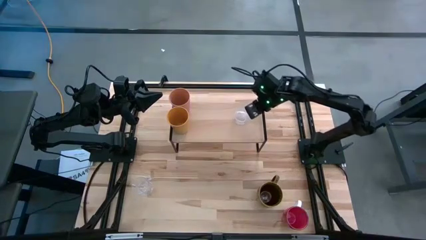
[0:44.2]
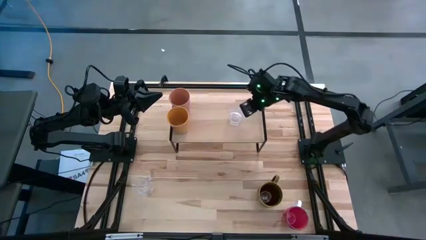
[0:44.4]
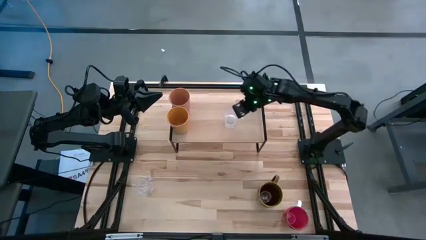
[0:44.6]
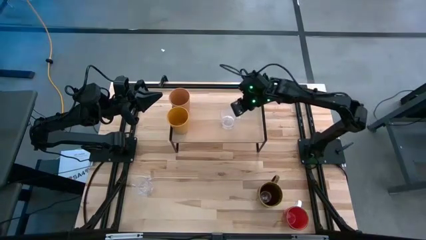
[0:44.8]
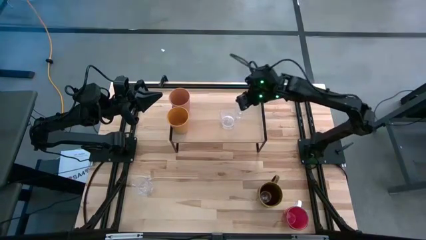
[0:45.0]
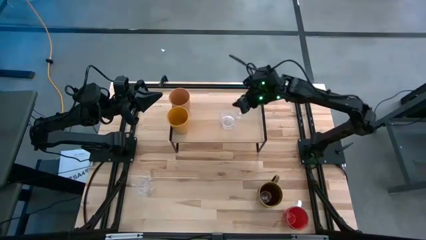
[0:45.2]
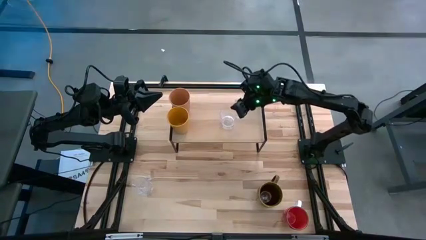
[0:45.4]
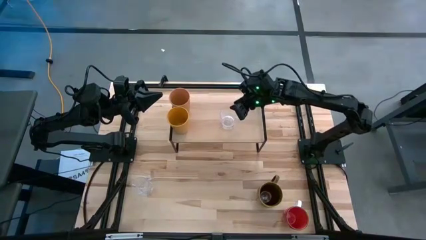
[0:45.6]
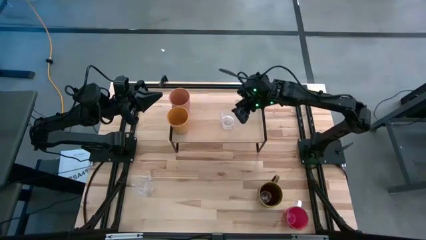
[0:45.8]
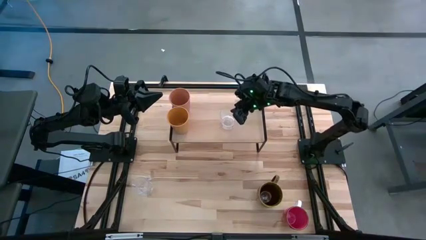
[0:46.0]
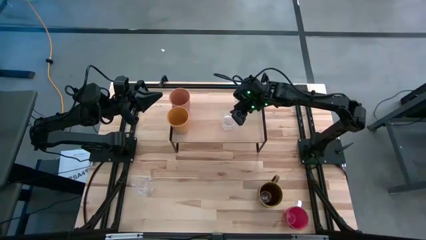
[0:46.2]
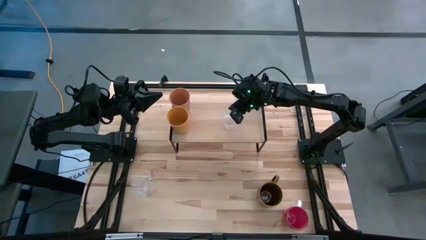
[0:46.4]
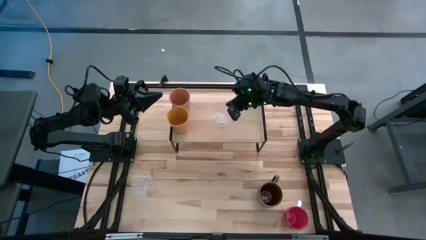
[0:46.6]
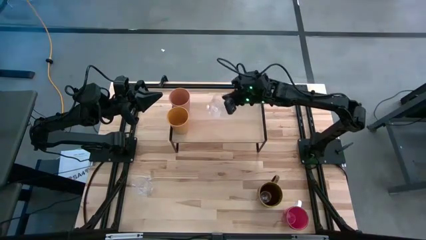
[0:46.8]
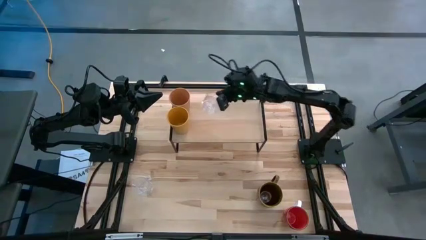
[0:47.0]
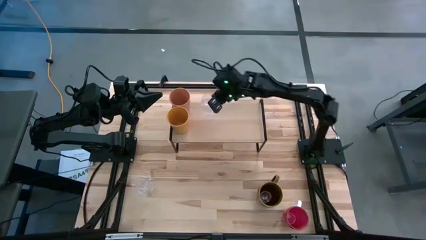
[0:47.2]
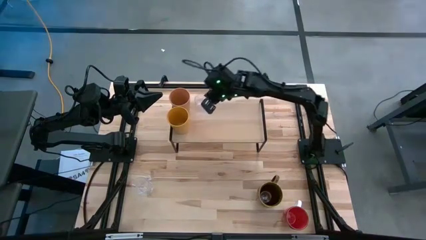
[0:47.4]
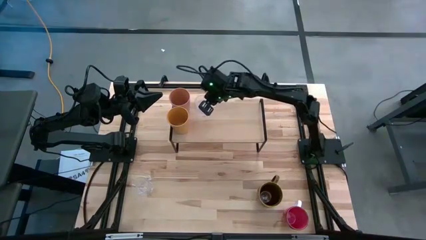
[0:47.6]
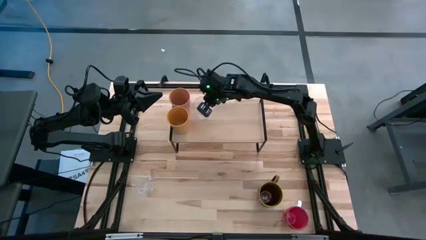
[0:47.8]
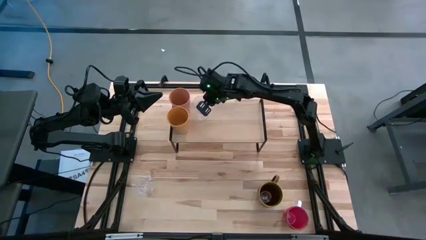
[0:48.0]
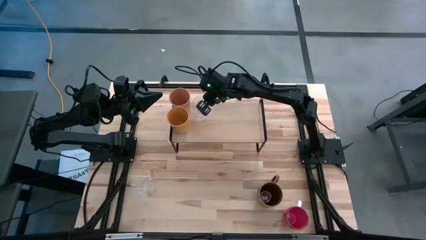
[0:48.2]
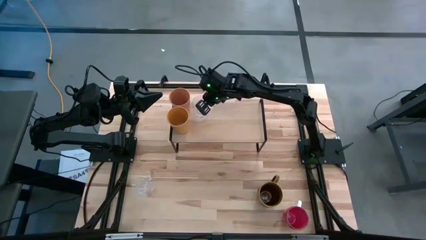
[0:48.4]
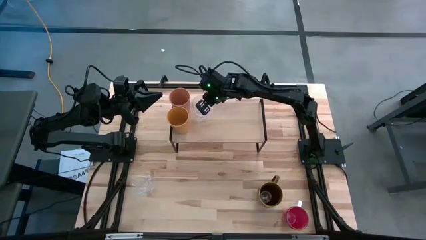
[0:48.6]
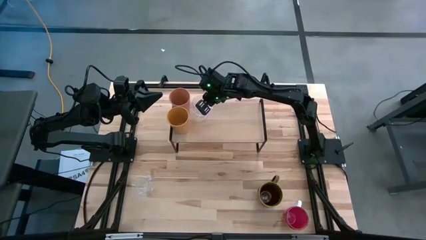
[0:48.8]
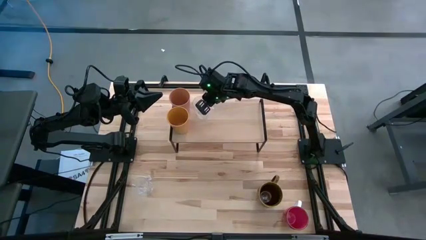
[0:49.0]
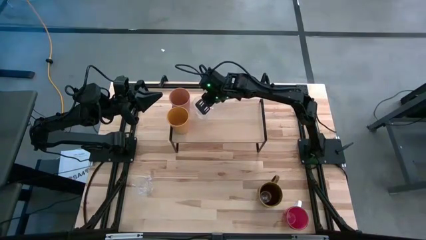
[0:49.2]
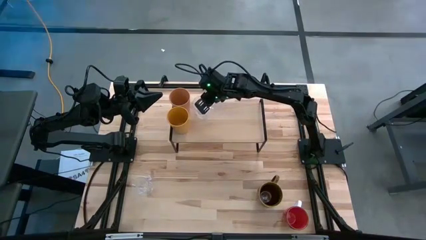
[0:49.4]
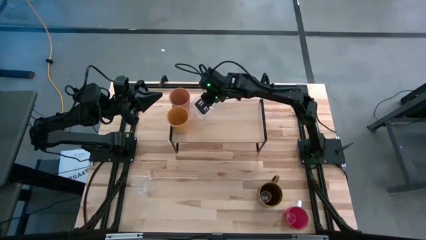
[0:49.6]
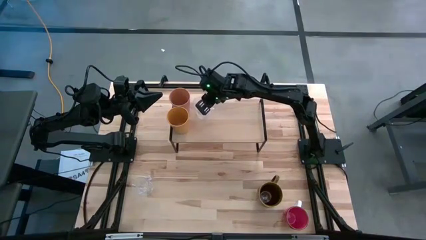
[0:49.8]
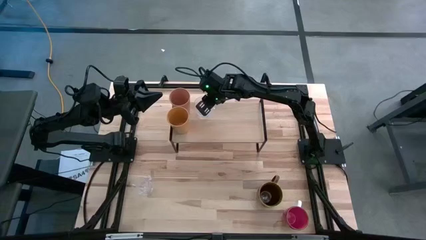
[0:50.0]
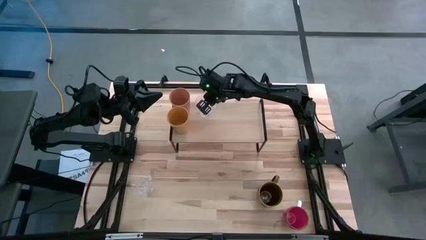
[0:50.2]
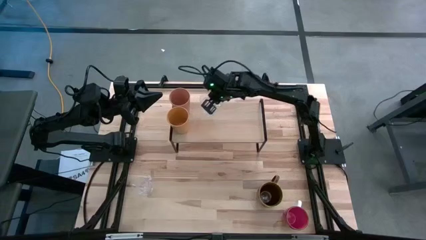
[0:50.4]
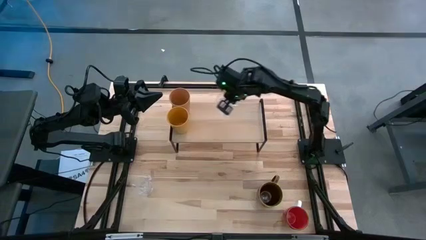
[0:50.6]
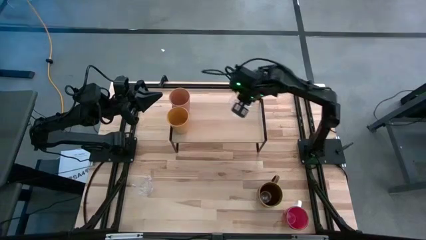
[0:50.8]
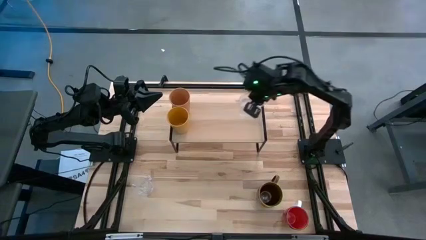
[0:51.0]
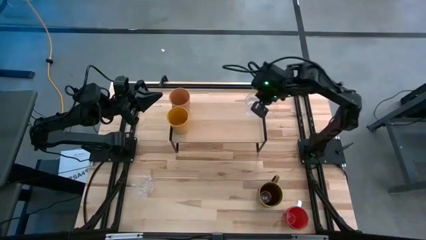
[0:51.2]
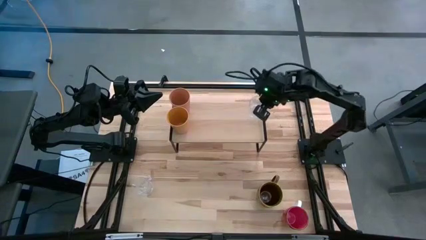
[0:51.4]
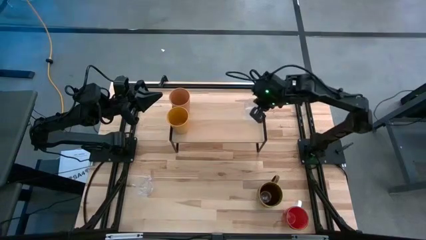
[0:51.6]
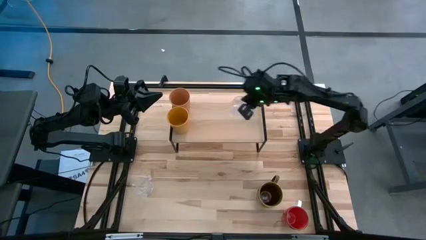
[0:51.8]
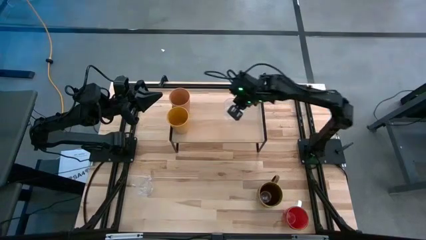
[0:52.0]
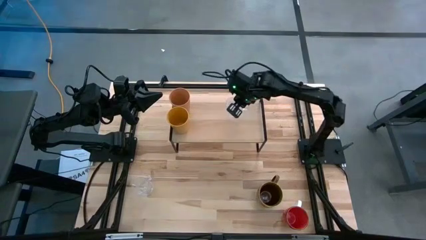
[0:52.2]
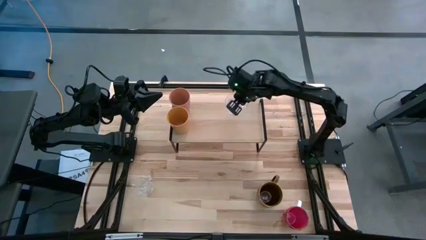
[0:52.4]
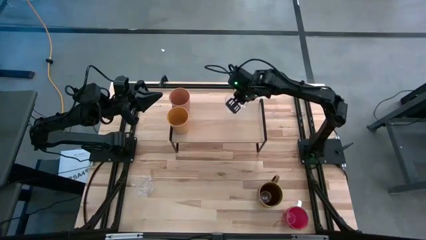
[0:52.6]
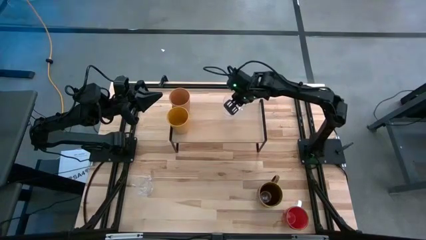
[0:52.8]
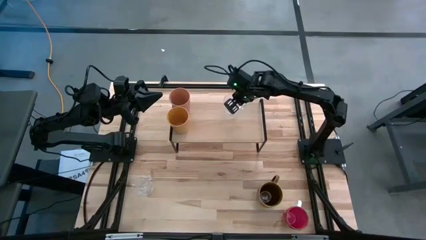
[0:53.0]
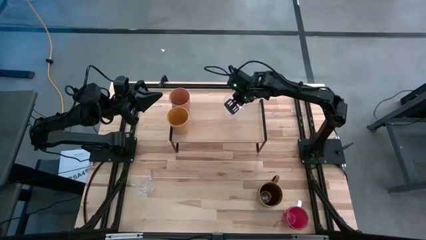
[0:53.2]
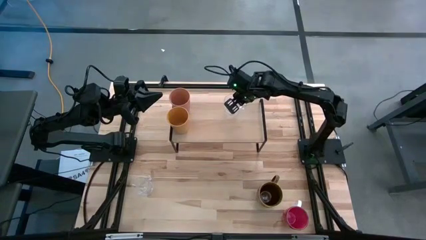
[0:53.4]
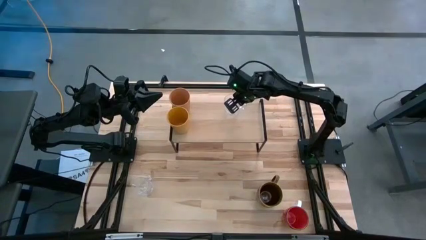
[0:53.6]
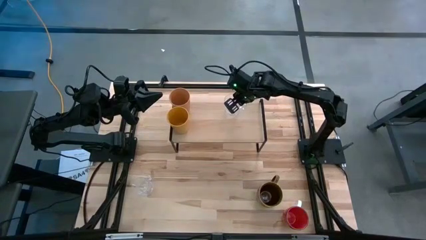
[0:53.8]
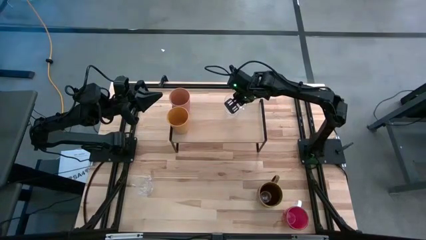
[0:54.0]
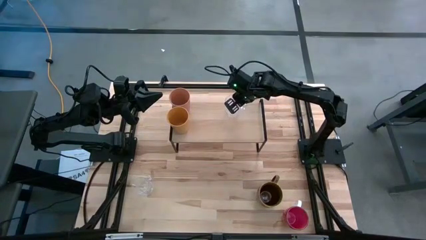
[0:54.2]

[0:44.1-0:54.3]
Task: Stack small to large cups/mugs on shelf
Put the top transparent mug on the shelf

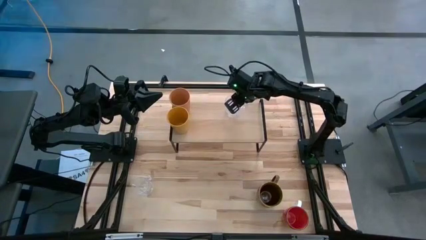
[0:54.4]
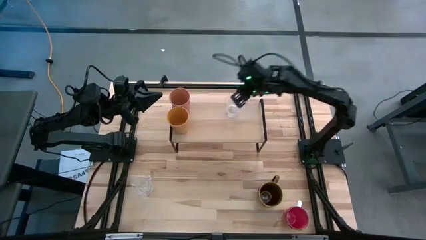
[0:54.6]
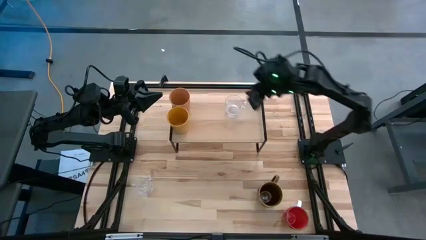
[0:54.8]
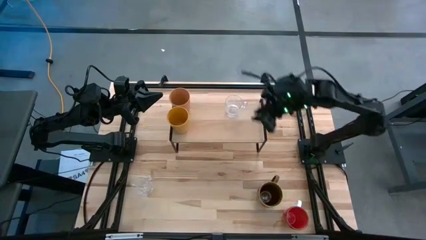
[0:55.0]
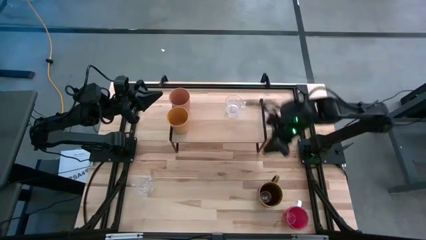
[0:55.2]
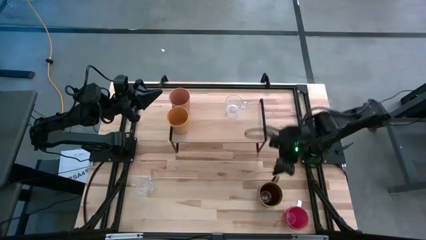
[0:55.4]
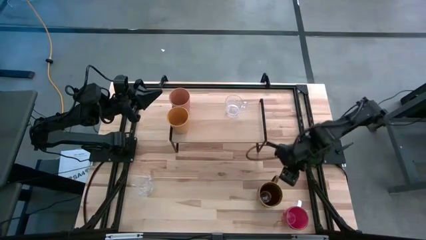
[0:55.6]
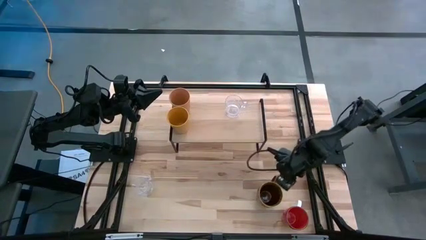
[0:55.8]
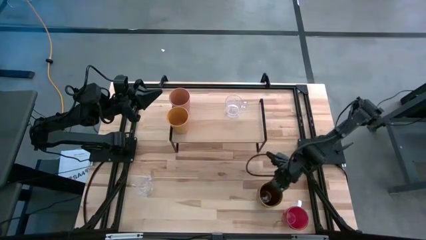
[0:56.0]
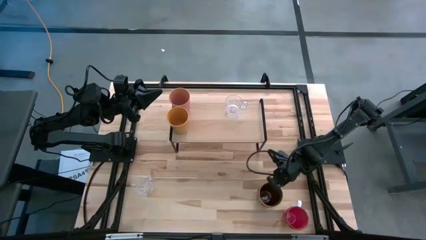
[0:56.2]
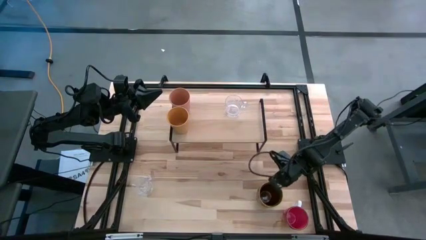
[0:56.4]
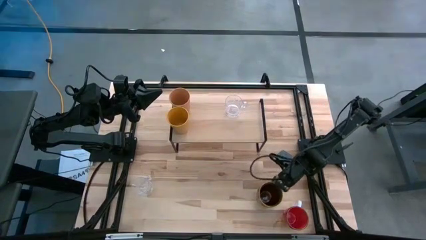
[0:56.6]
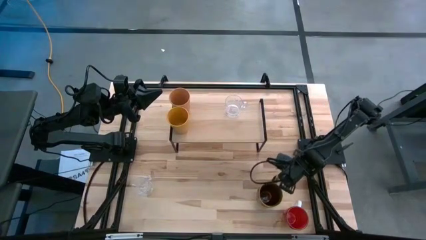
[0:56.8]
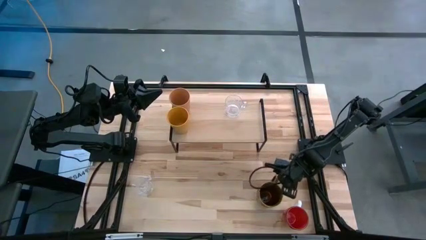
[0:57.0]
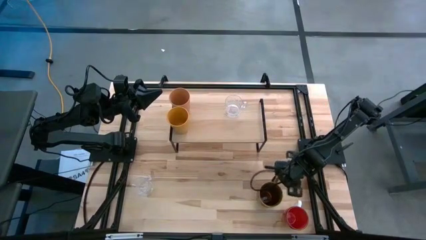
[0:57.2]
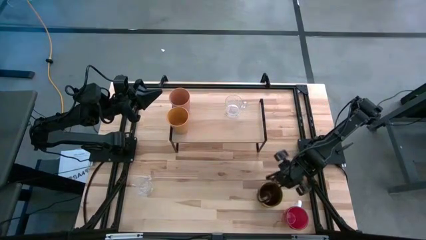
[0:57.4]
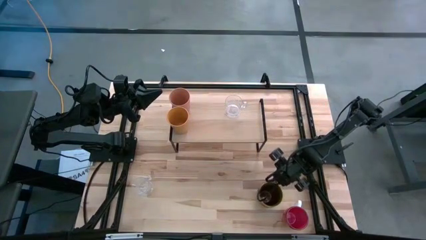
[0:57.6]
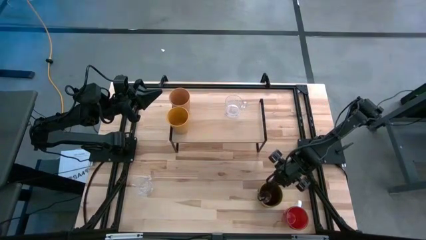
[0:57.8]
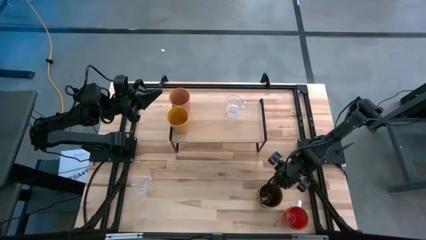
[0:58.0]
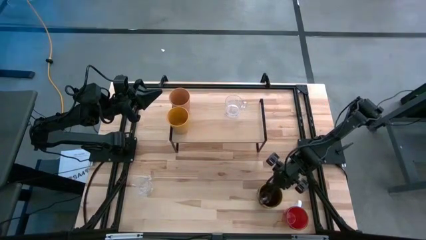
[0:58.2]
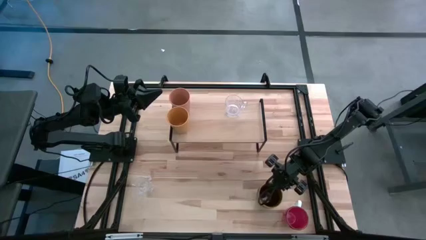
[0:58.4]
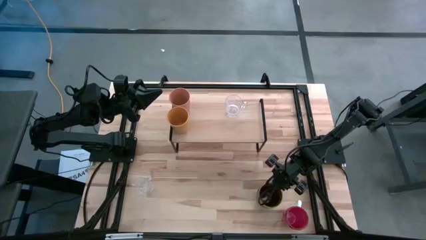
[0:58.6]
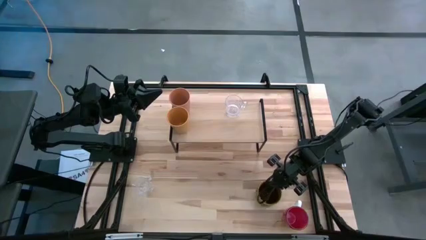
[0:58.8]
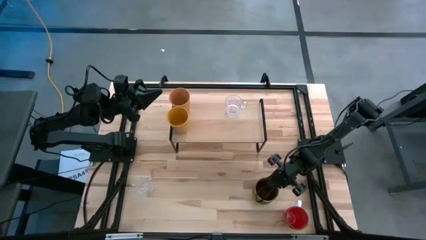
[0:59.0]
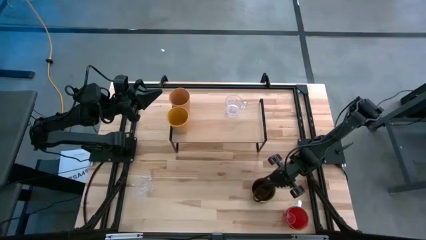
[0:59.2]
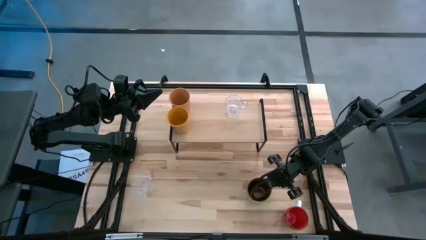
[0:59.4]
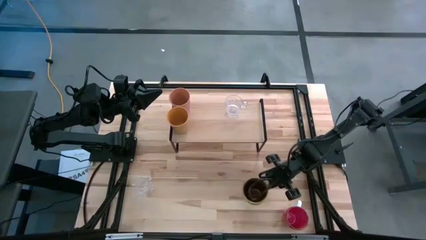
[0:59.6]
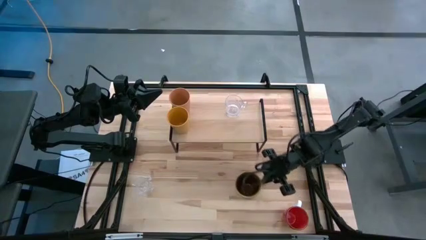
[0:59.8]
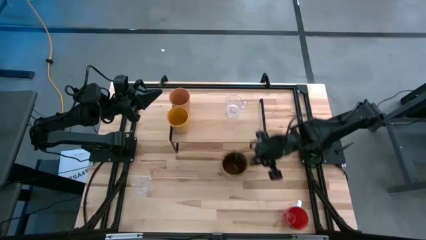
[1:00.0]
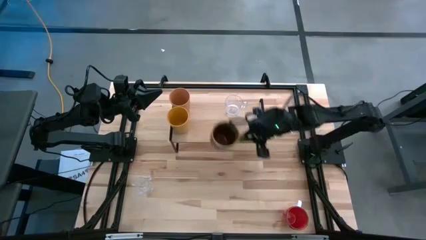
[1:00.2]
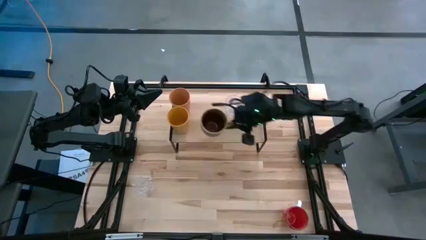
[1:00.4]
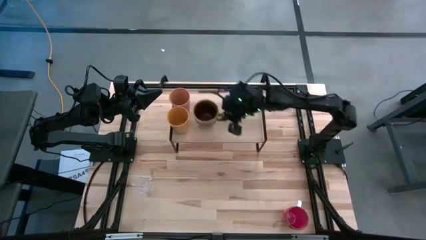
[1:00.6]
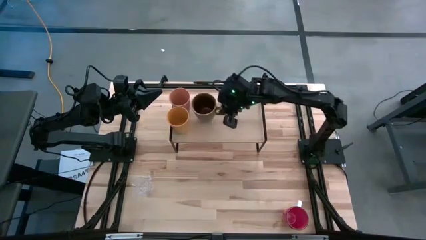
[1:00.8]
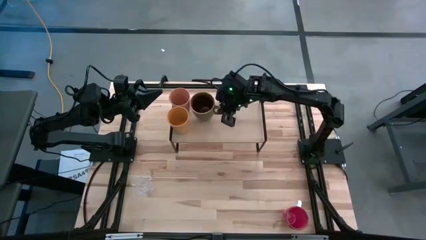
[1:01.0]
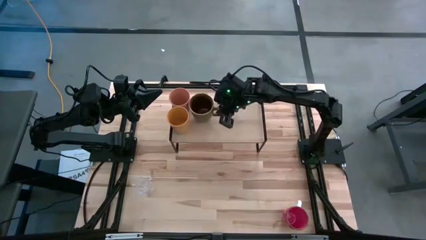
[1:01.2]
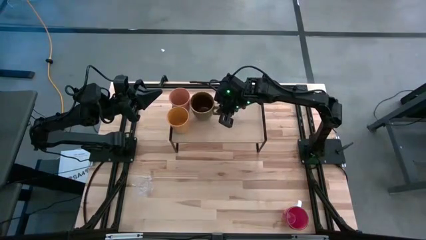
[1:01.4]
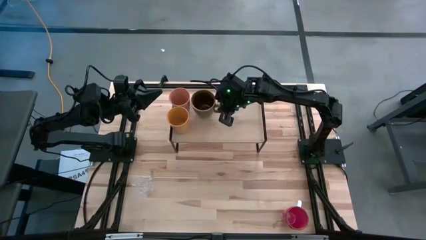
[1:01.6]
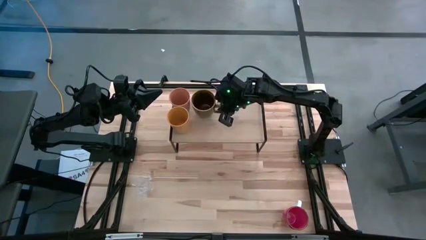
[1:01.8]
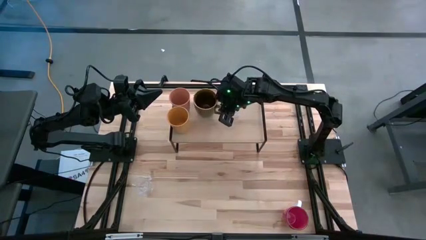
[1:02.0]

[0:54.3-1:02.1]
Put the green mug on the shelf
